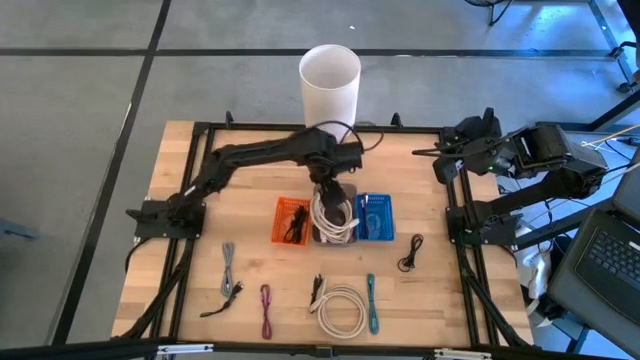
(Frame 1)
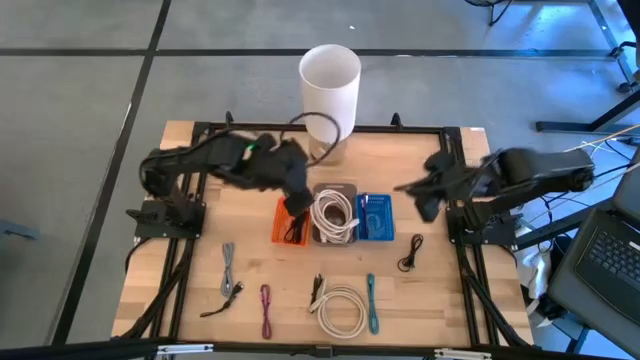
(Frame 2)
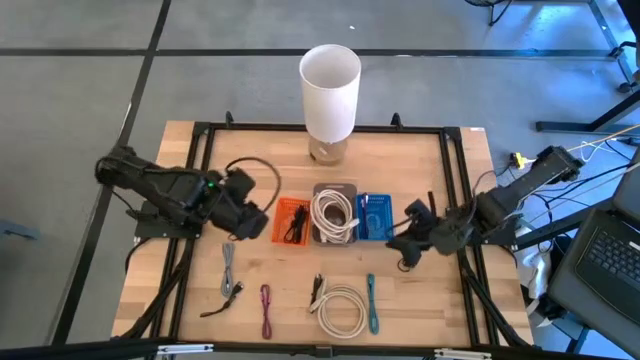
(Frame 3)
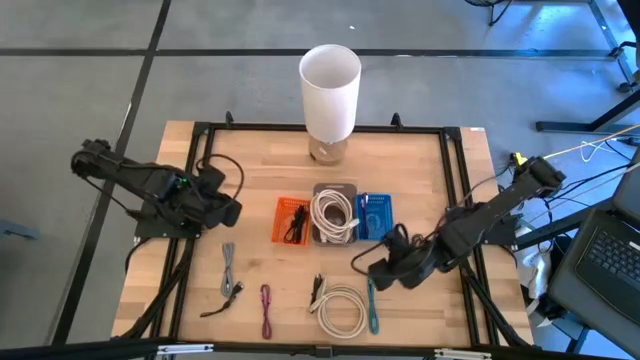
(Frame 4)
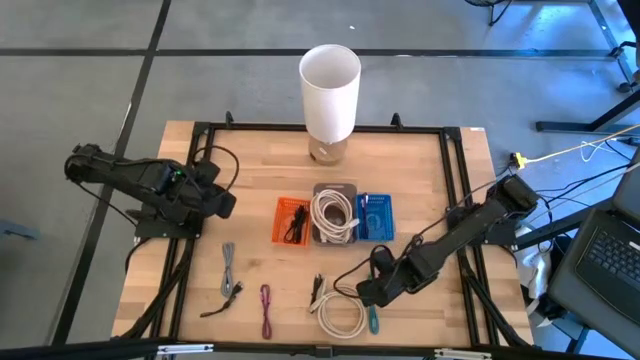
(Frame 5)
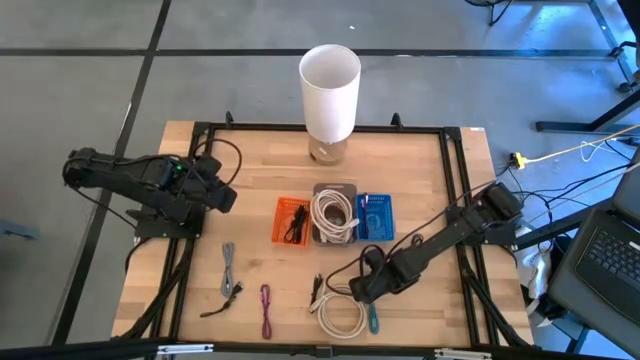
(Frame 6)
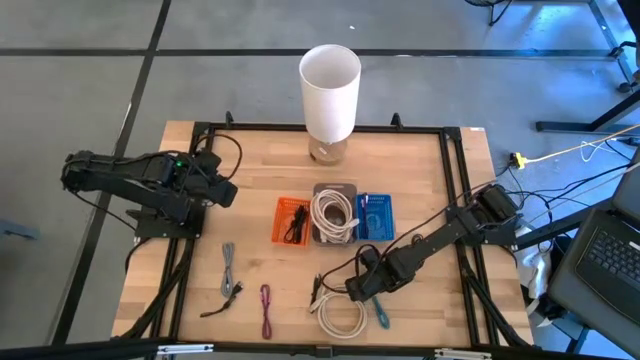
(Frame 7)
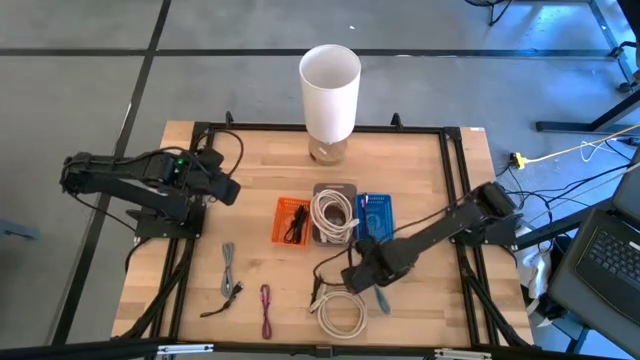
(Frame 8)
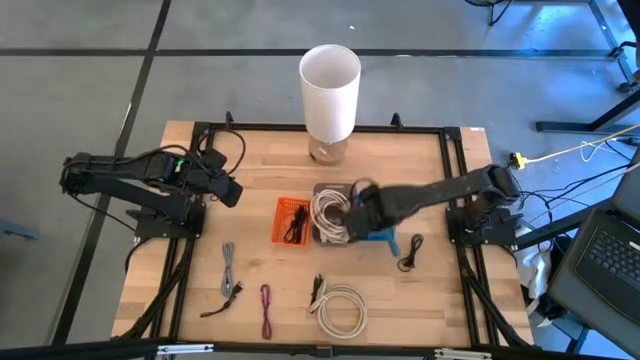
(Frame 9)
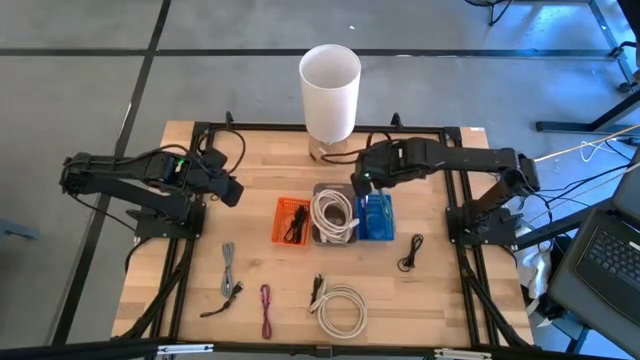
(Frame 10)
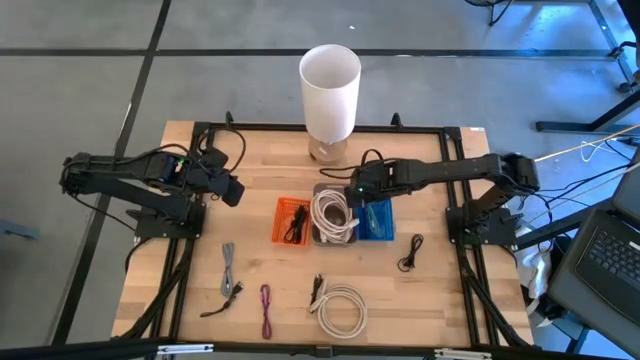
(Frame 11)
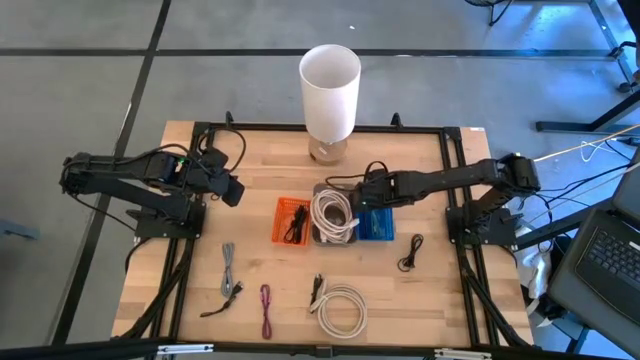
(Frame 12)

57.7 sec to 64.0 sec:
Task: Pick & Place USB Port
Put the blue charger cable into the blue bin

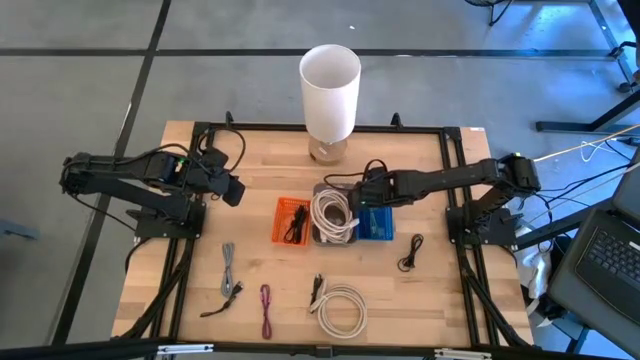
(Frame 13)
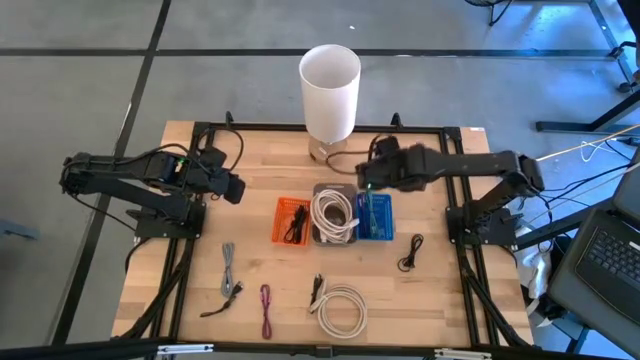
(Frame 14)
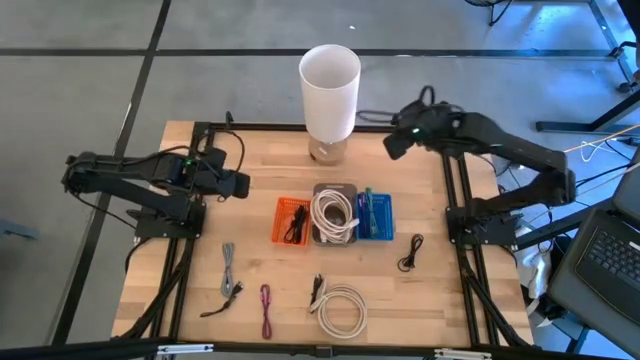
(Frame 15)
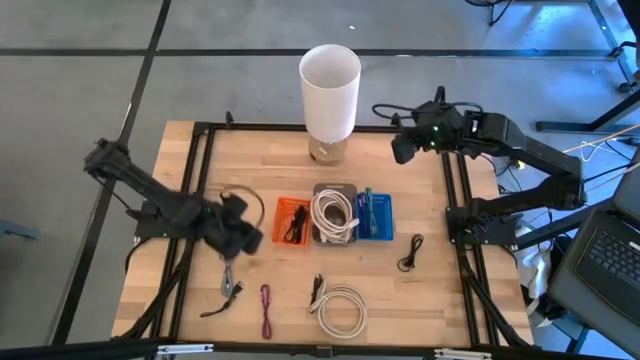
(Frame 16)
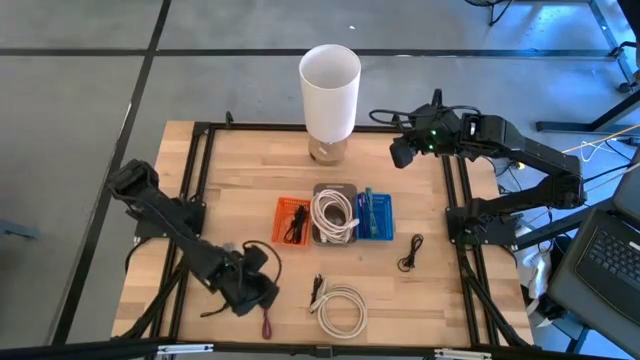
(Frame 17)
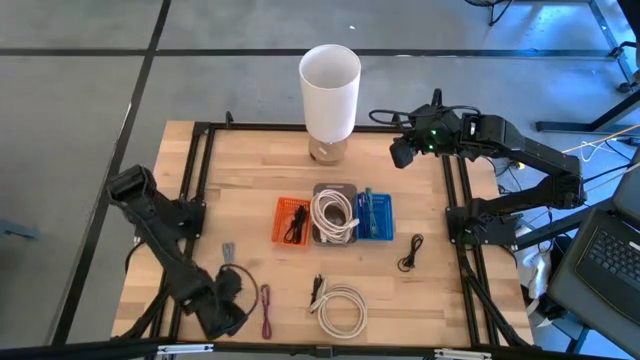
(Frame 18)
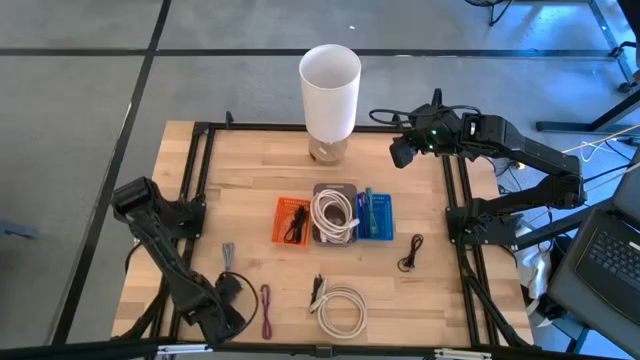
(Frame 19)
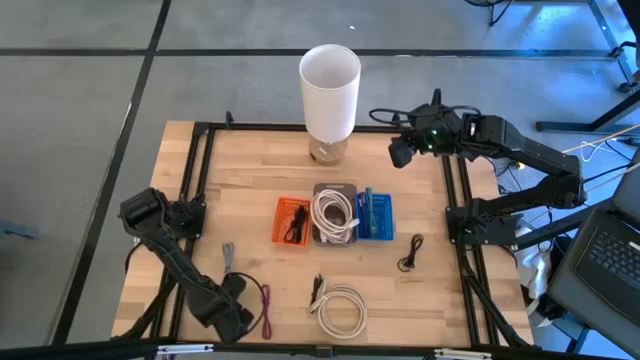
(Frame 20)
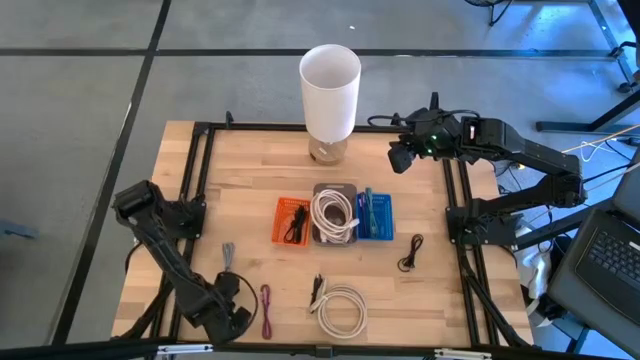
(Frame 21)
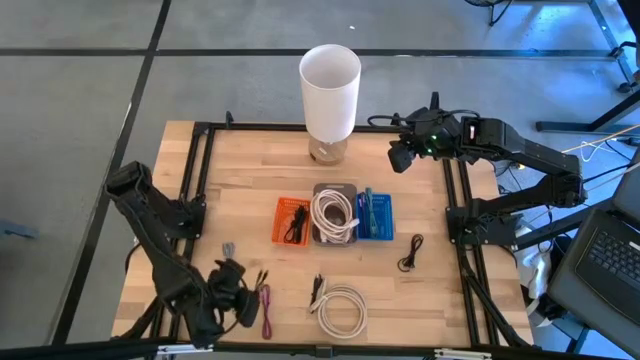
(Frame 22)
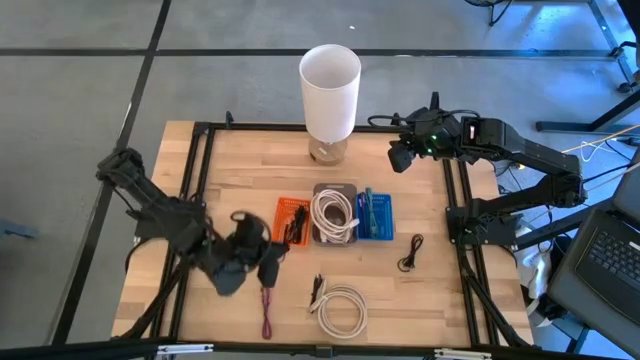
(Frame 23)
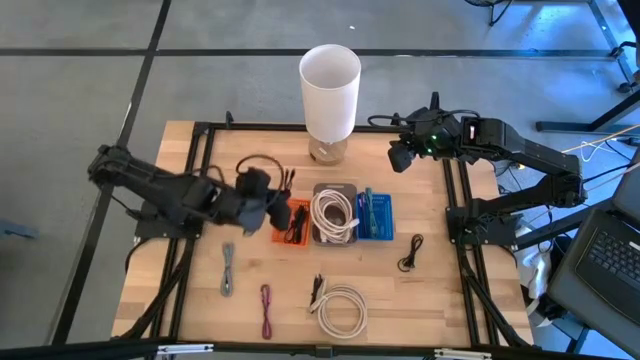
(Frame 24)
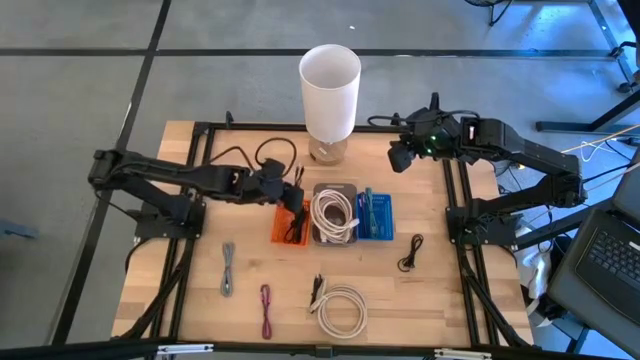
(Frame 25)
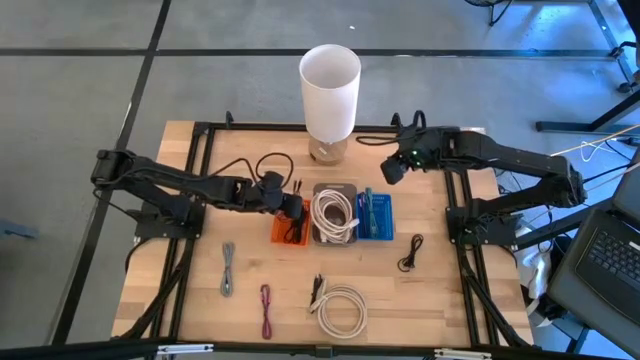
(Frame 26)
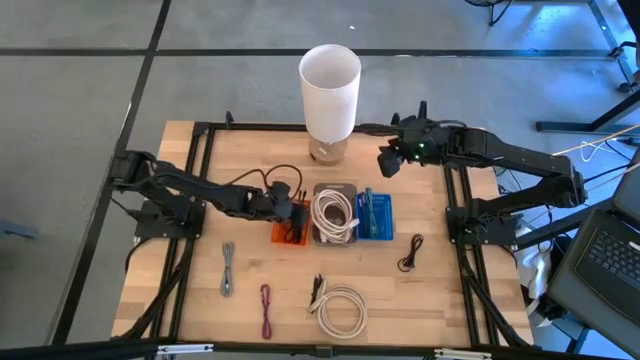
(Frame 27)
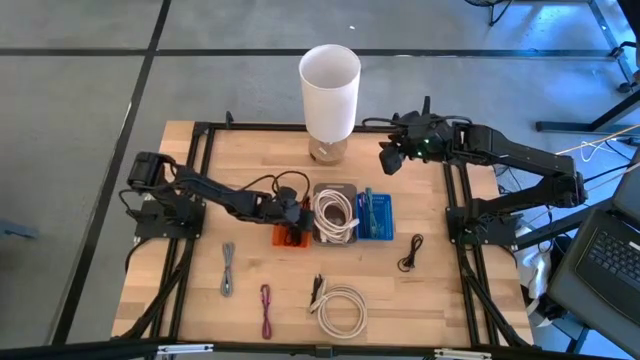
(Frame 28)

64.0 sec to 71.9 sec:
Put the black charger cable into the orange bin

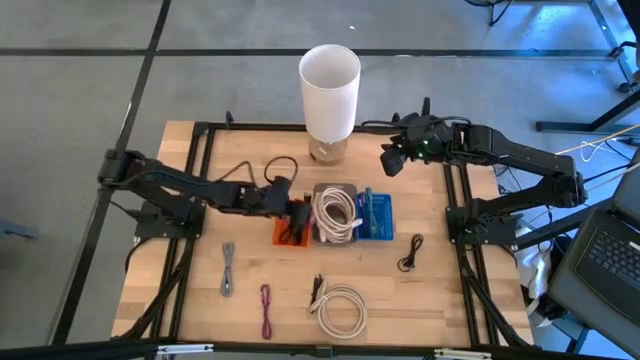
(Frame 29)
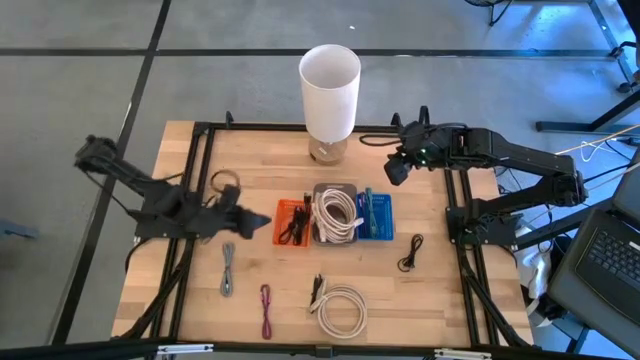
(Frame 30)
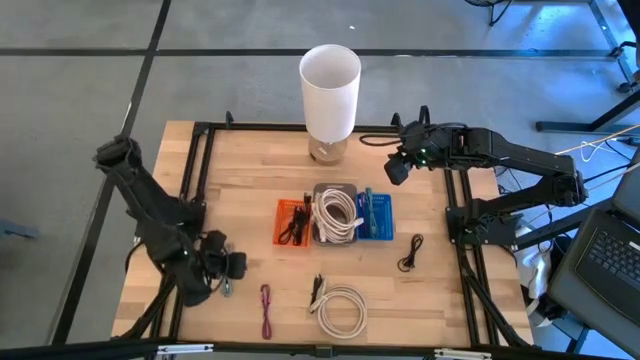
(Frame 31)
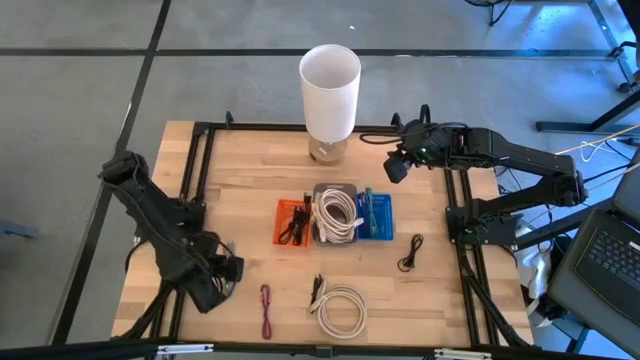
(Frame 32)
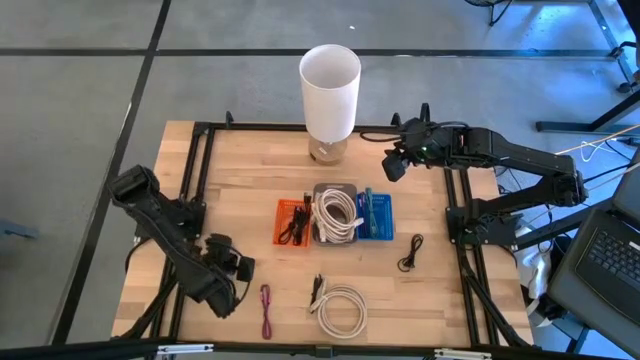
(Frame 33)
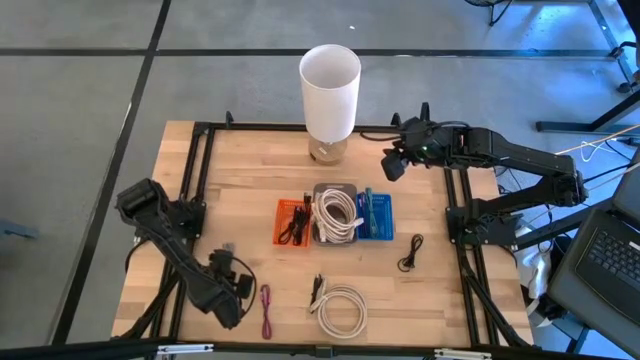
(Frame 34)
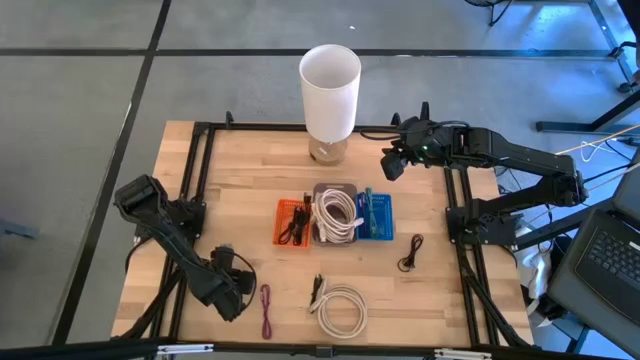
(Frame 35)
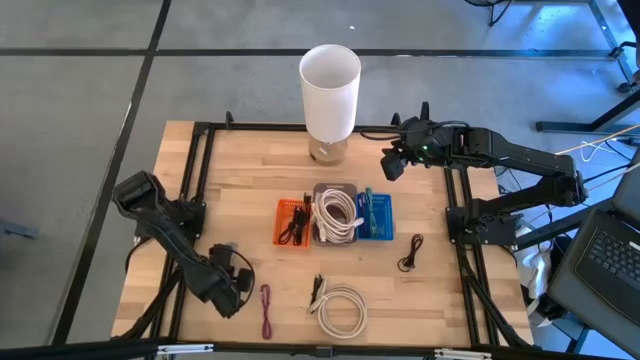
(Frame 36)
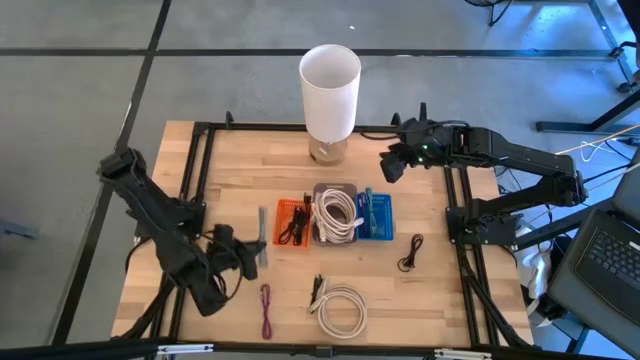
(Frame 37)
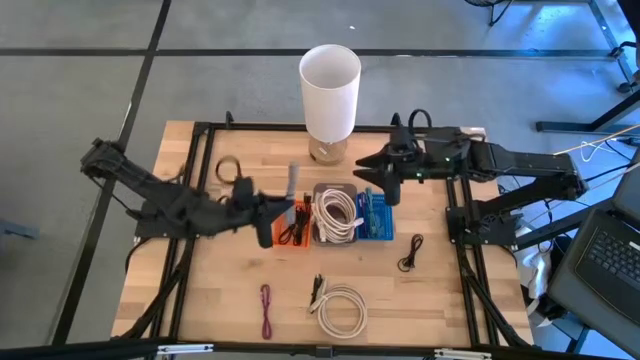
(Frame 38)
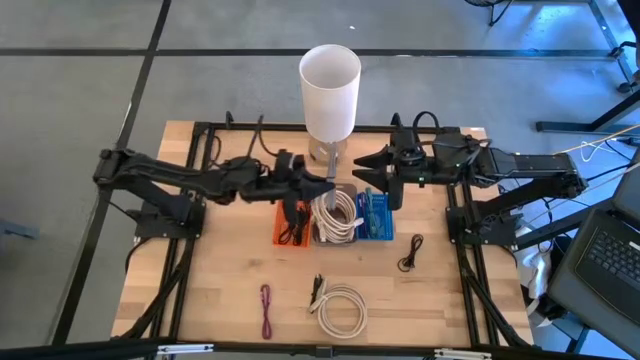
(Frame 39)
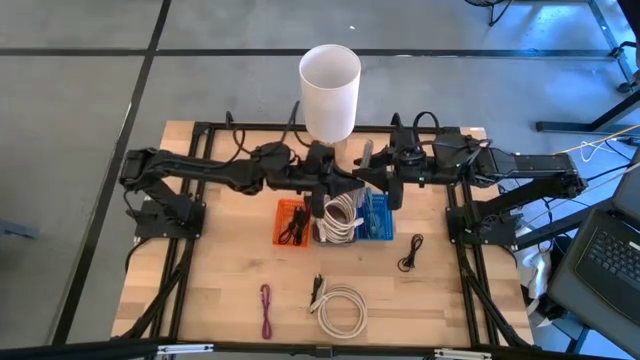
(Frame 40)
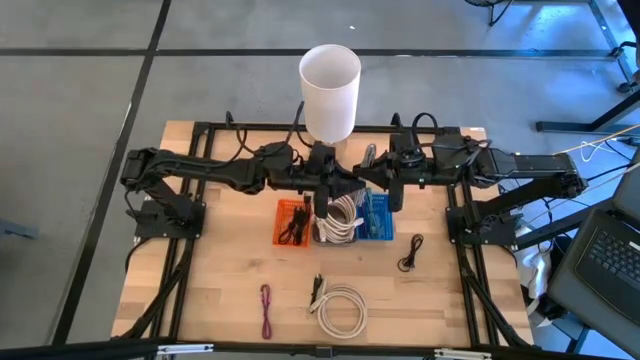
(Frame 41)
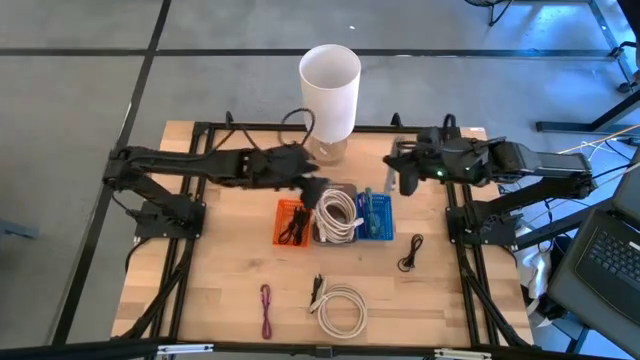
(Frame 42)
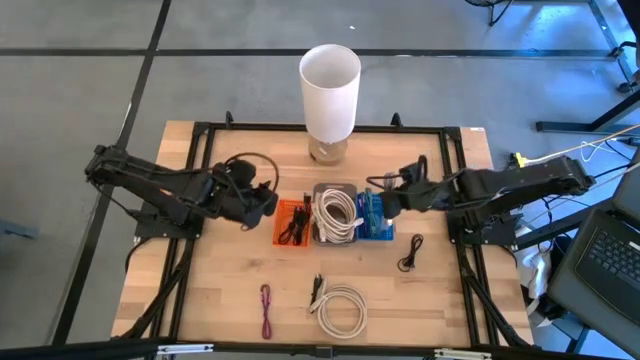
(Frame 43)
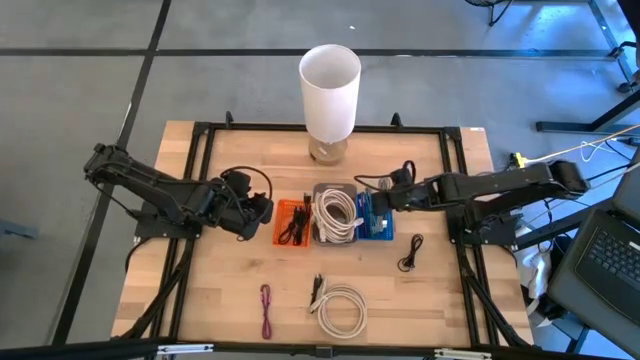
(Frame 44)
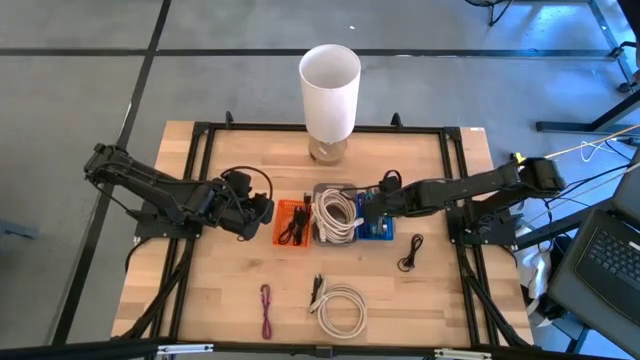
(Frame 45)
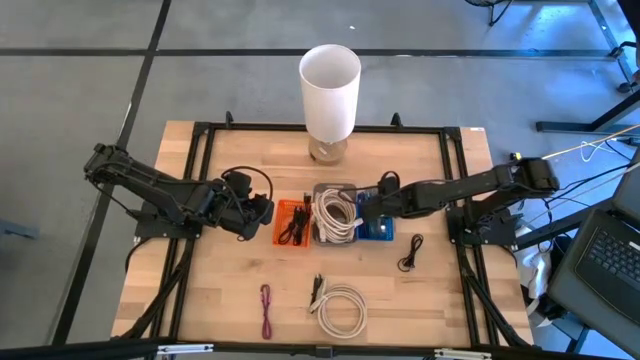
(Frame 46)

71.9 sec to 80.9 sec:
Put the black and white charger cable into the blue bin
